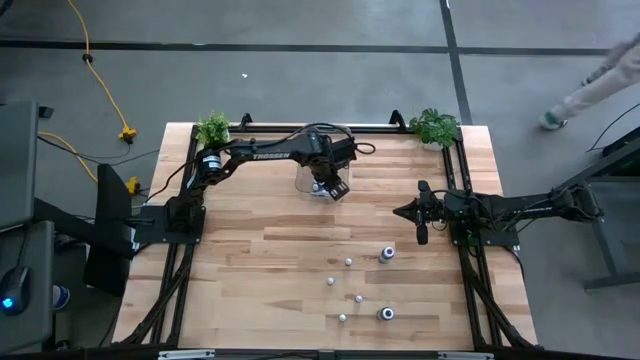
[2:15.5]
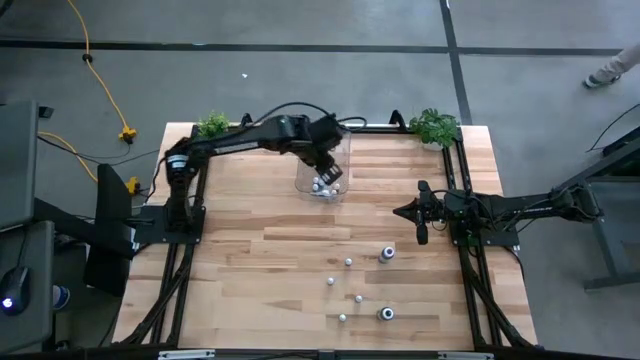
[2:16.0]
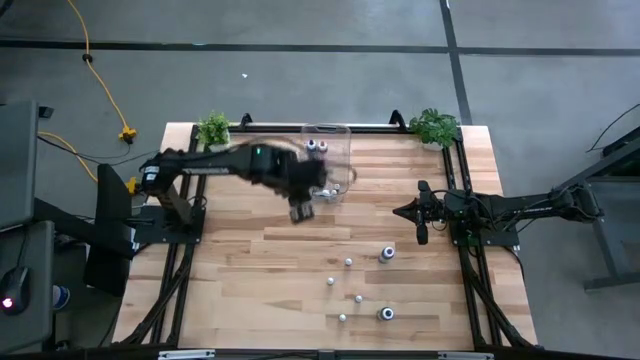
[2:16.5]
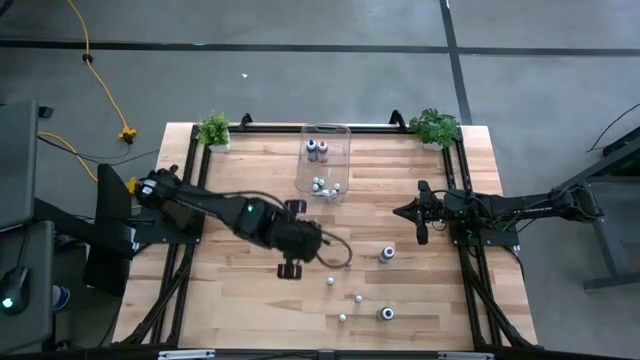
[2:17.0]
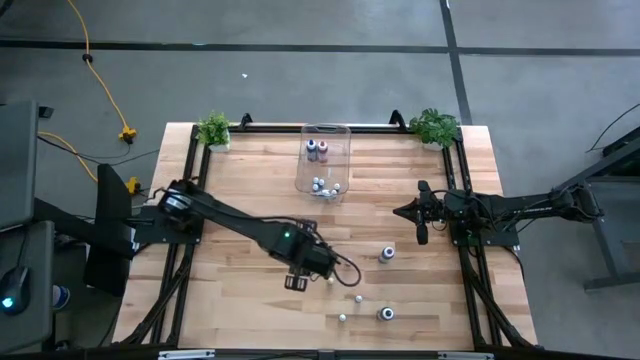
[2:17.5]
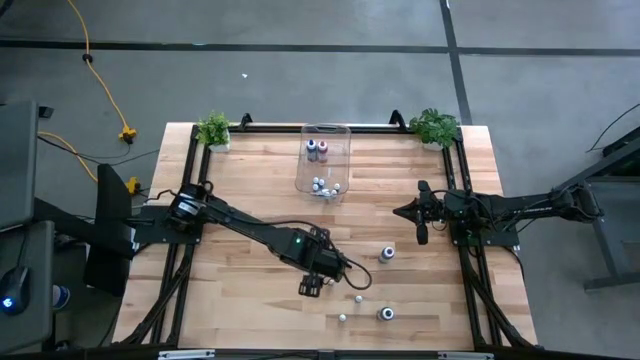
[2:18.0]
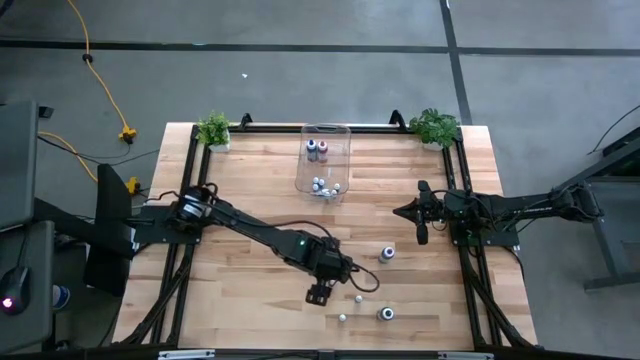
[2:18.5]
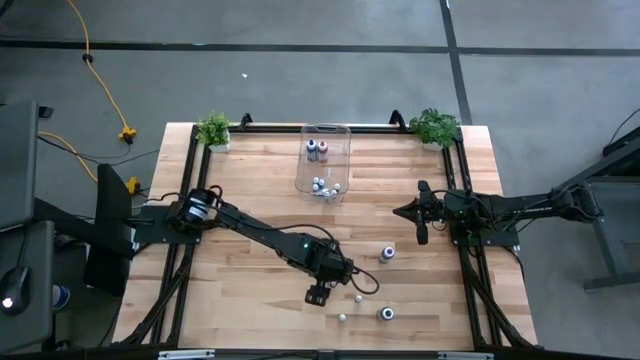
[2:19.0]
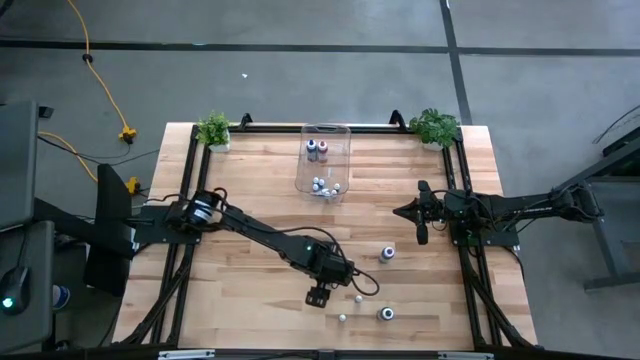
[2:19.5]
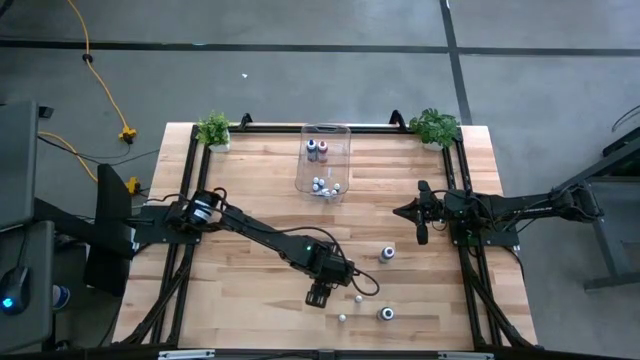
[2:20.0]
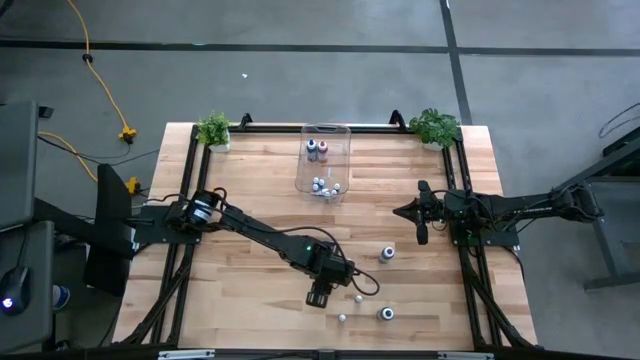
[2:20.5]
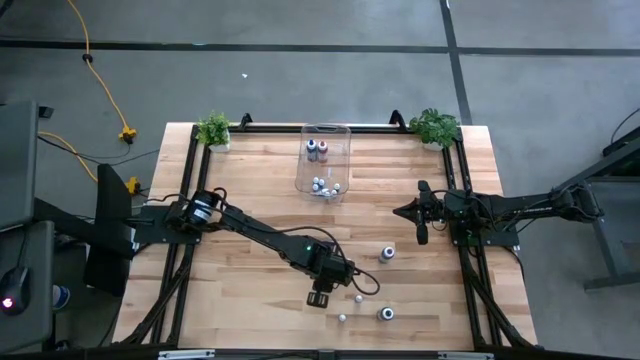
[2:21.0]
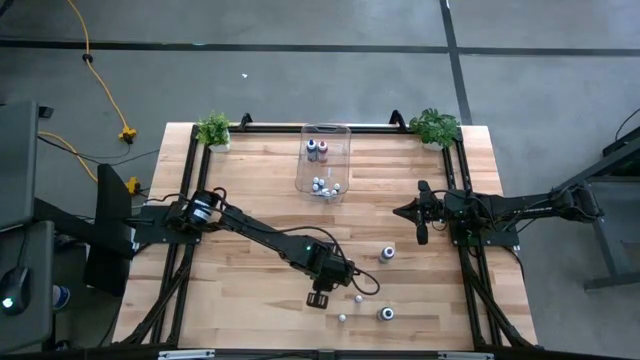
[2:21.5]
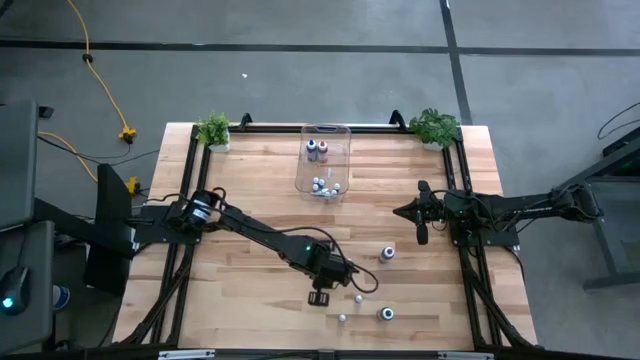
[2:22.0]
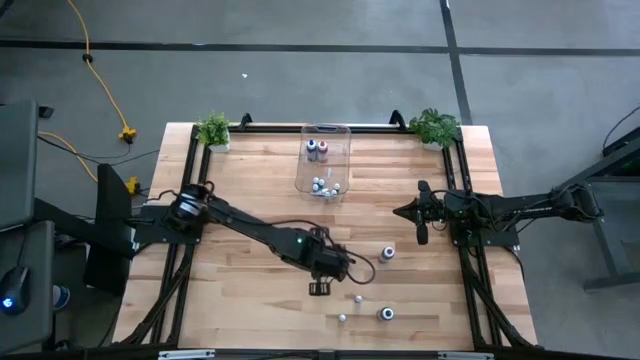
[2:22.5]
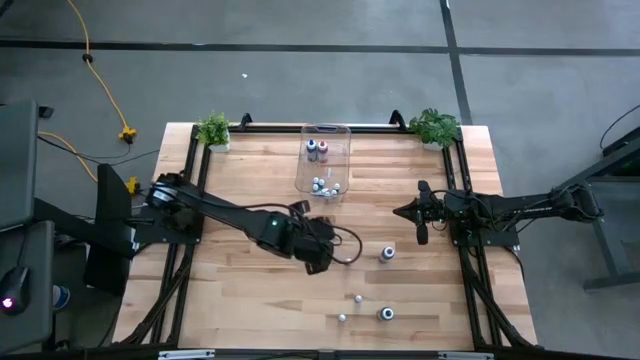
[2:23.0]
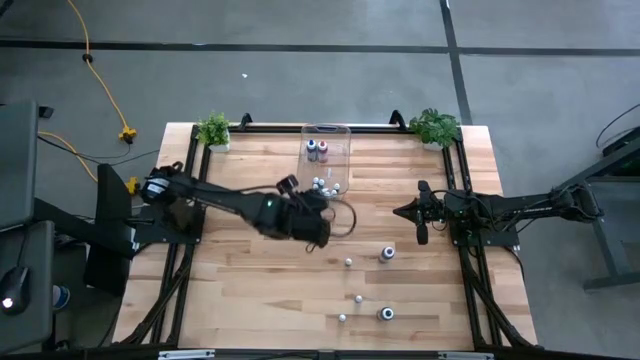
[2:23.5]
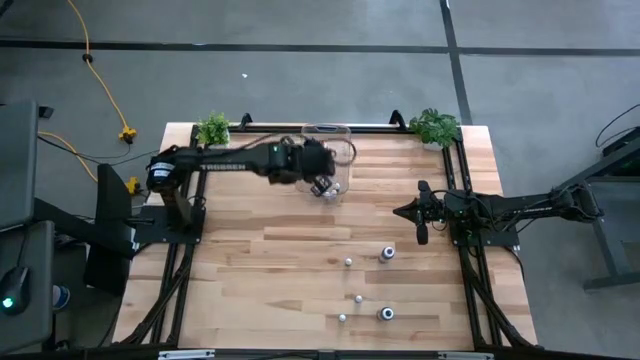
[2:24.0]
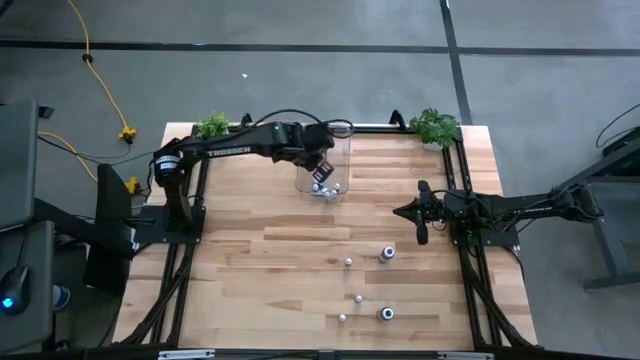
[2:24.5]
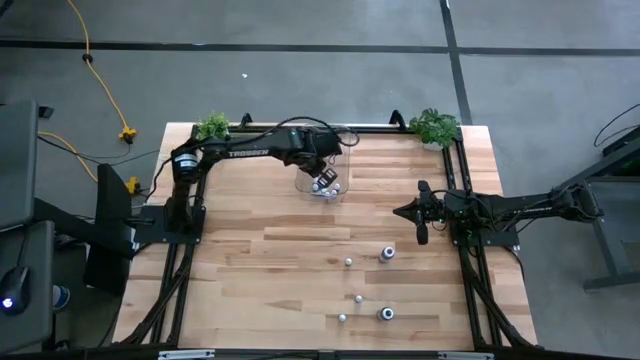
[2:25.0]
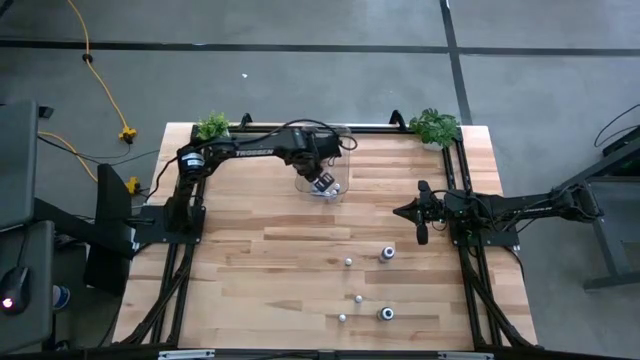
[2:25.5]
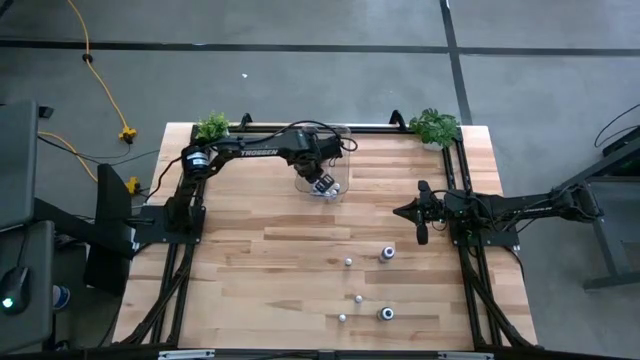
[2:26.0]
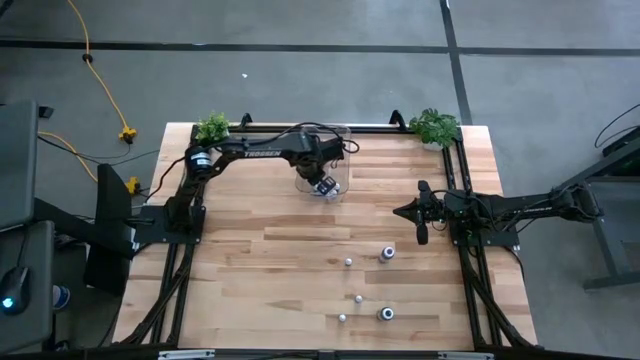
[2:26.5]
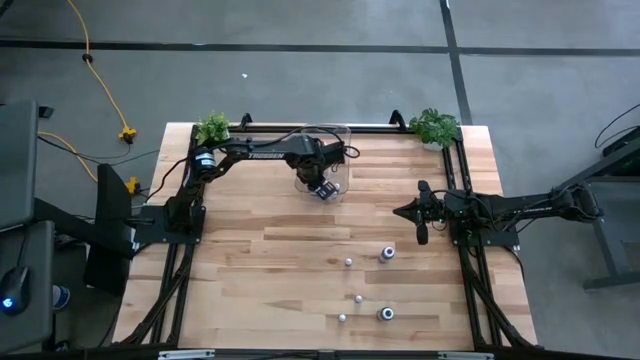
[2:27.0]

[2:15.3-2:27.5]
Task: Pick & Place food coloring
Put the small green food coloring into the transparent bin

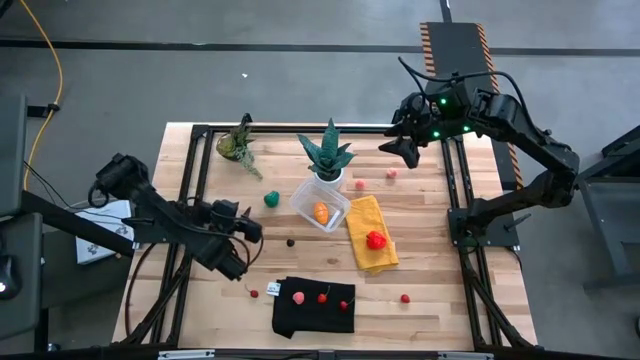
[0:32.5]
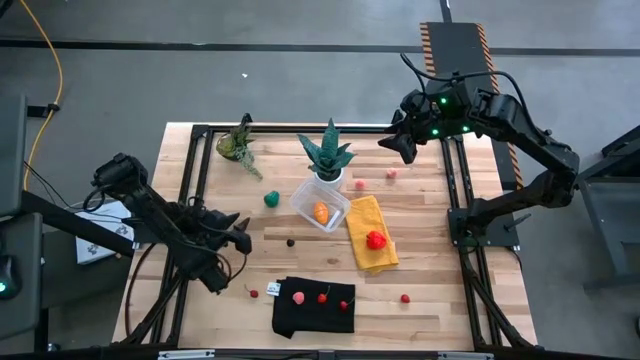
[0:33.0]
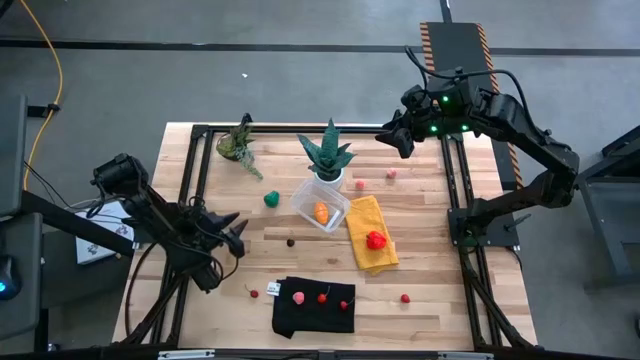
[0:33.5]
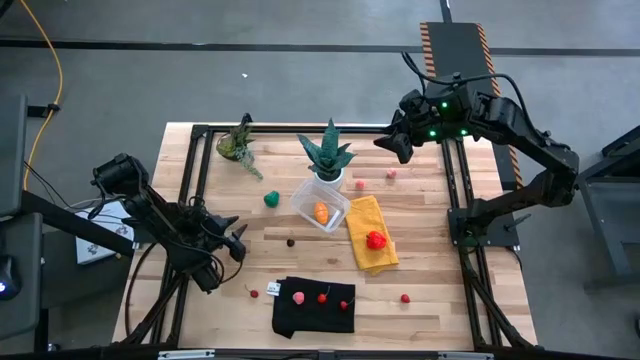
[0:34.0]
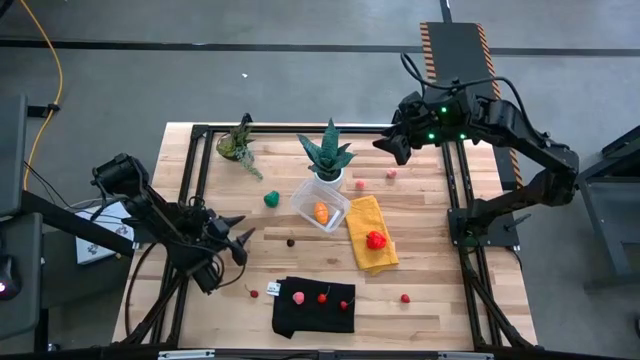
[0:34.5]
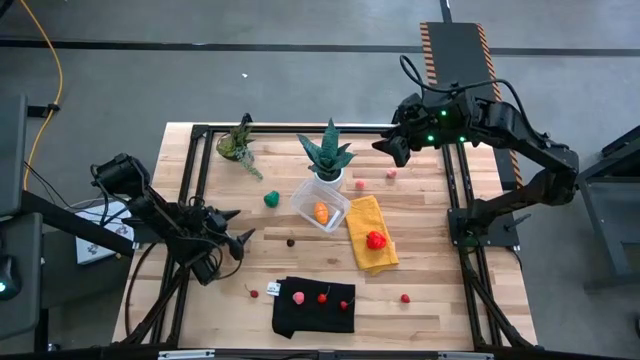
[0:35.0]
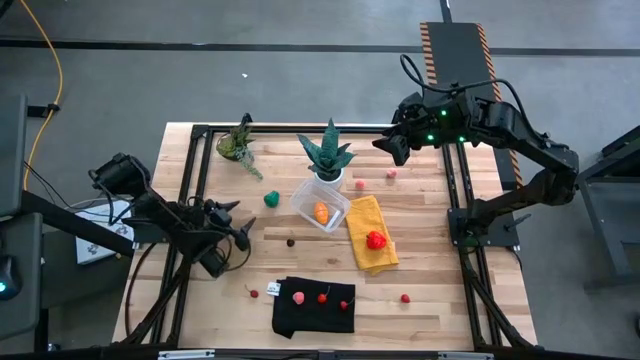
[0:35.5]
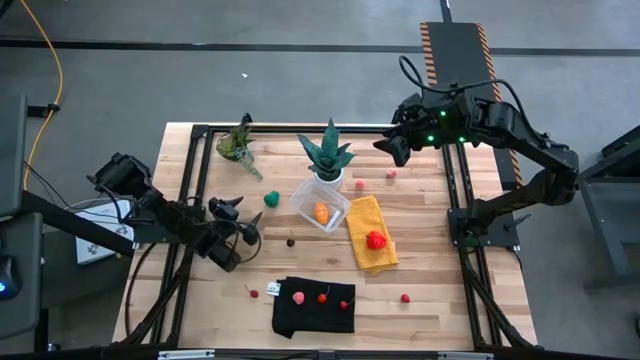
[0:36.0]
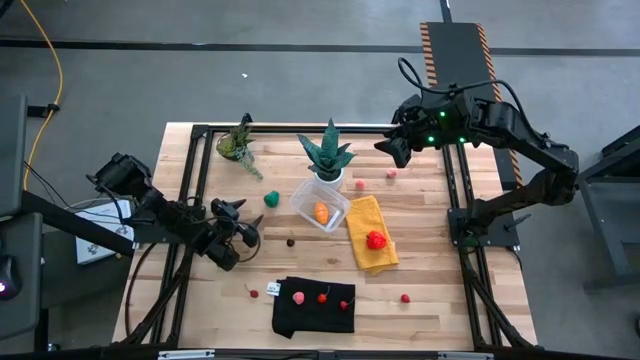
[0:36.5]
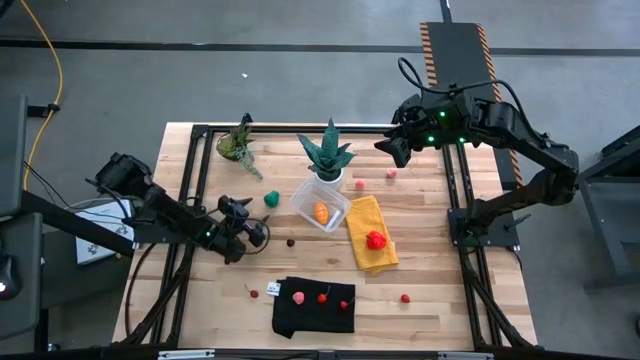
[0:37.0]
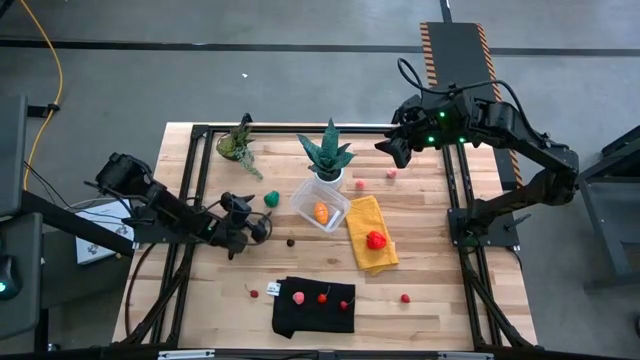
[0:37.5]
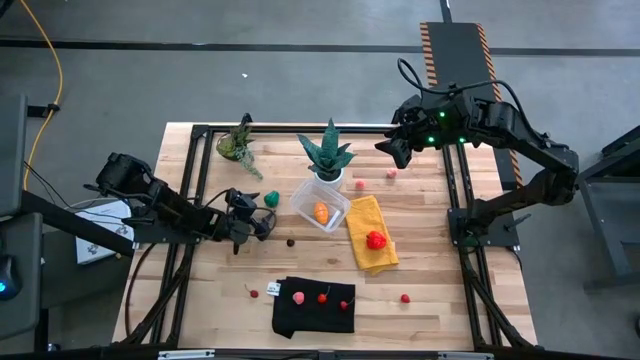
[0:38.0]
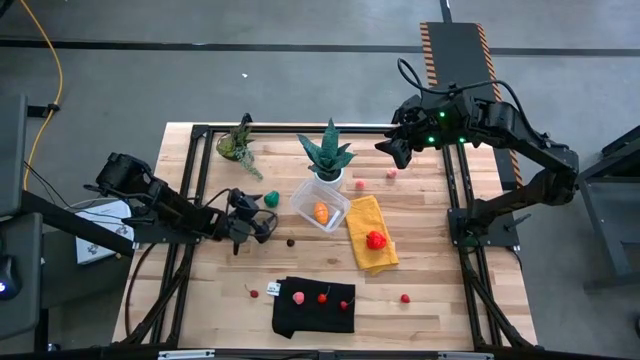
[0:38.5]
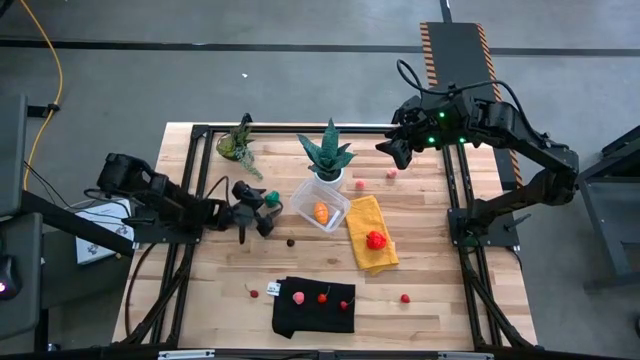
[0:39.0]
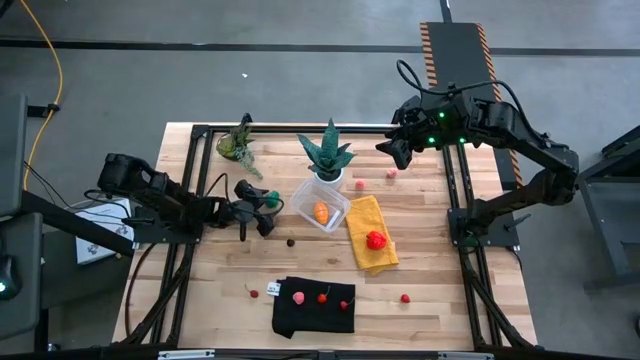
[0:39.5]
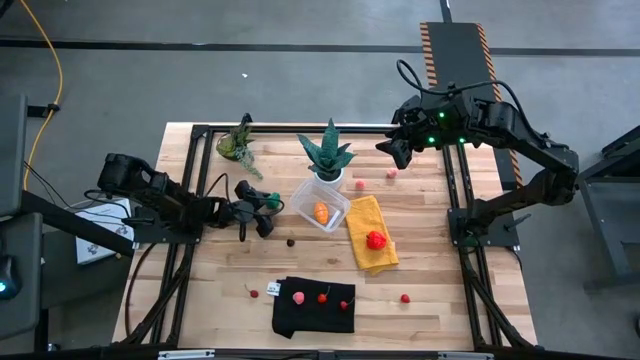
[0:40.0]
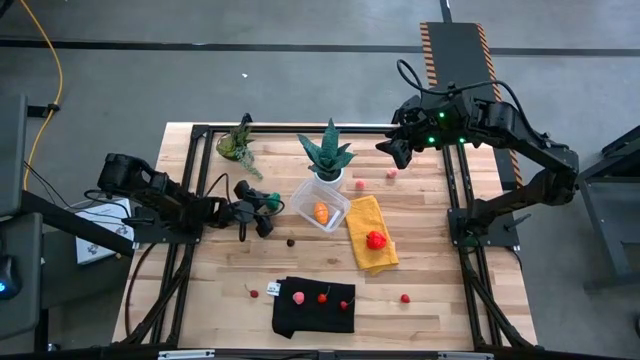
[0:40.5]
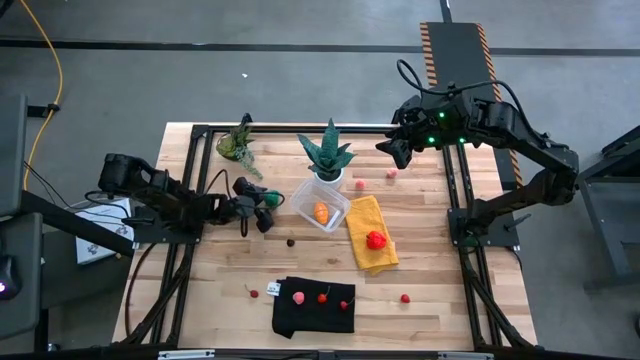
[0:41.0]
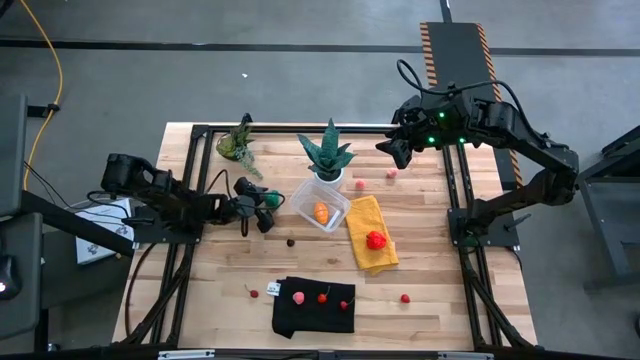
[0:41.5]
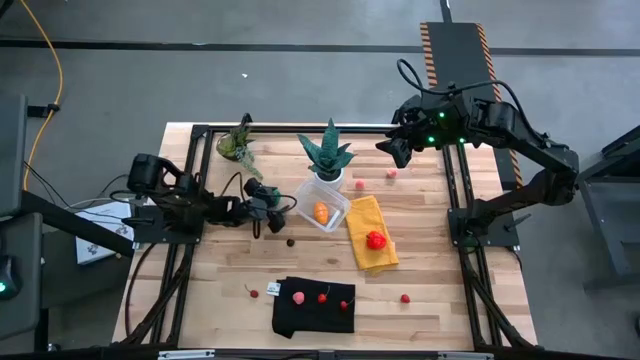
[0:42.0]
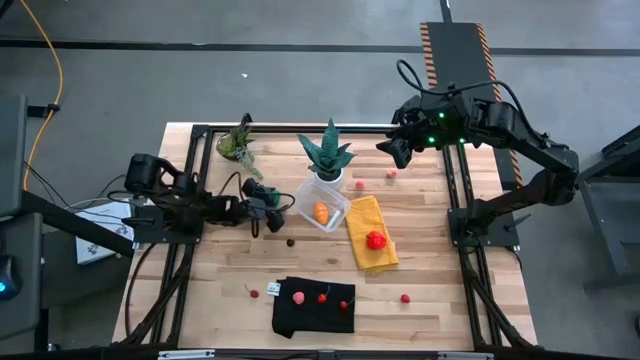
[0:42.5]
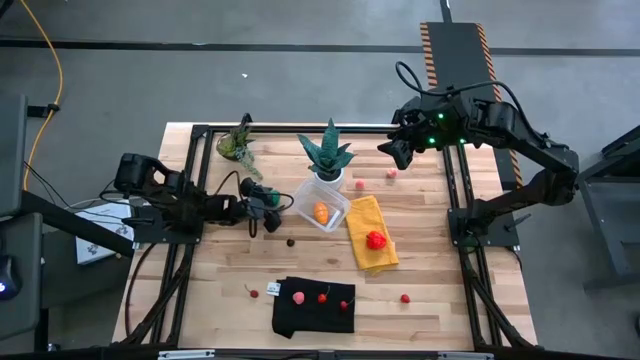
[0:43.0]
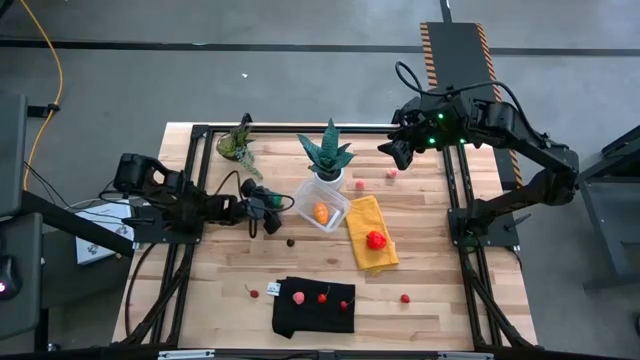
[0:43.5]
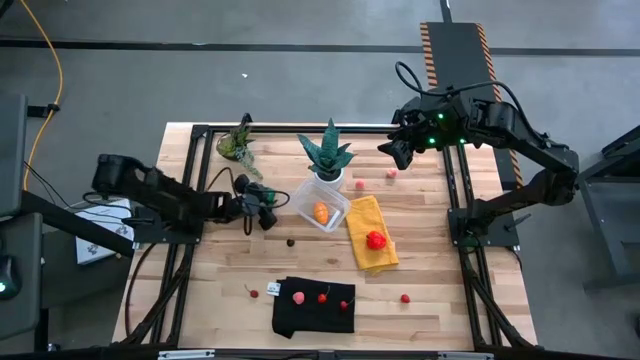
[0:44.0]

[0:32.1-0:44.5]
Task: Pick and placing Produce into tupperware
Put the green bell pepper into the transparent container
